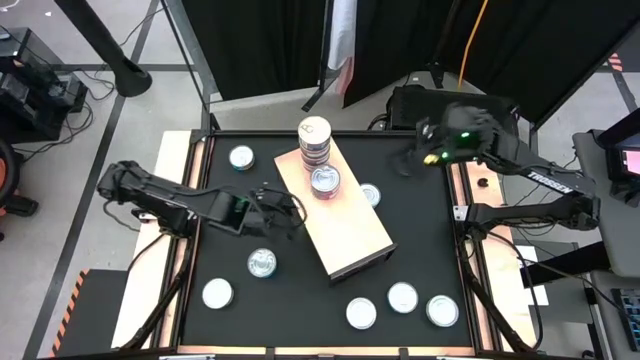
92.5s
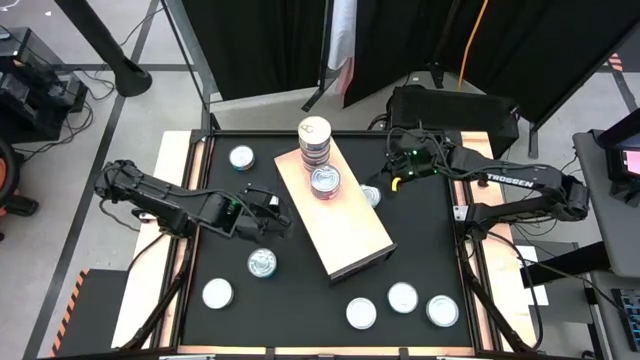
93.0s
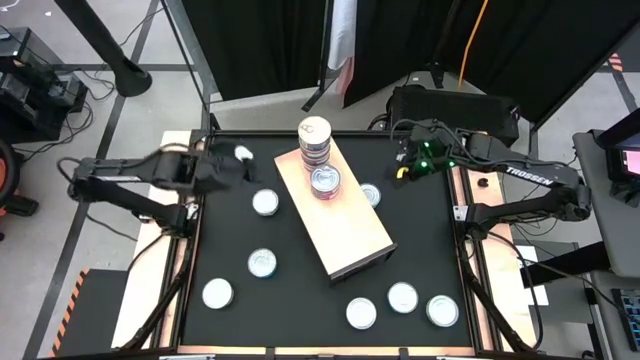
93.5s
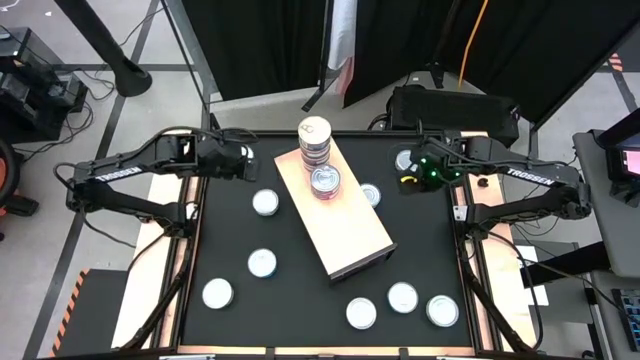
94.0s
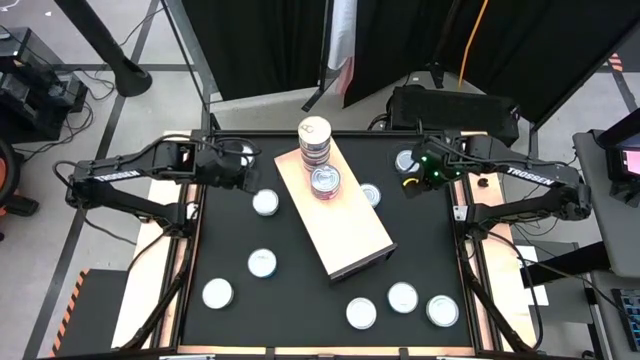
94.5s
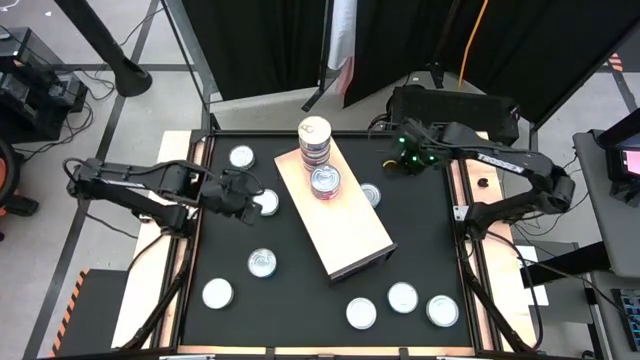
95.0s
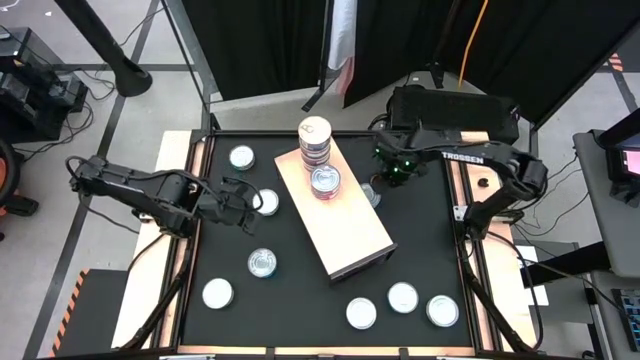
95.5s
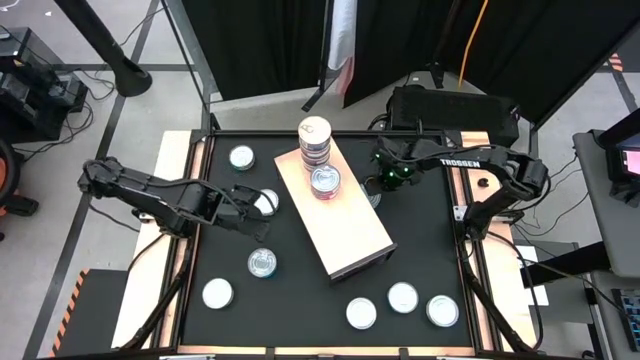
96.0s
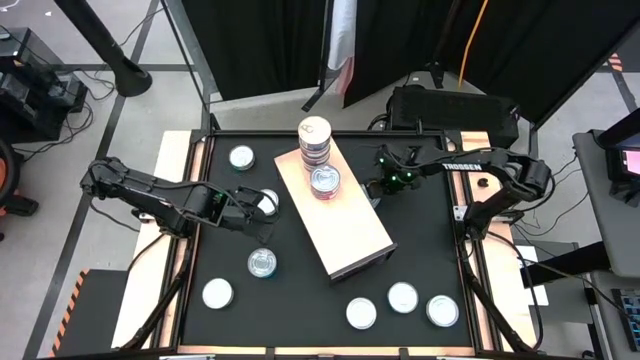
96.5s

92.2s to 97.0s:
Task: Stack canned seafood by type on shelf
Put the yellow-blue tuna can on the shelf

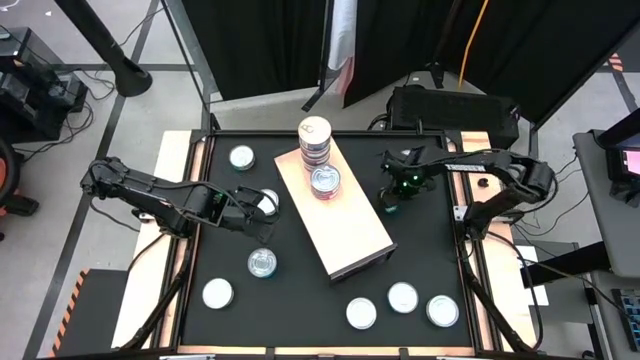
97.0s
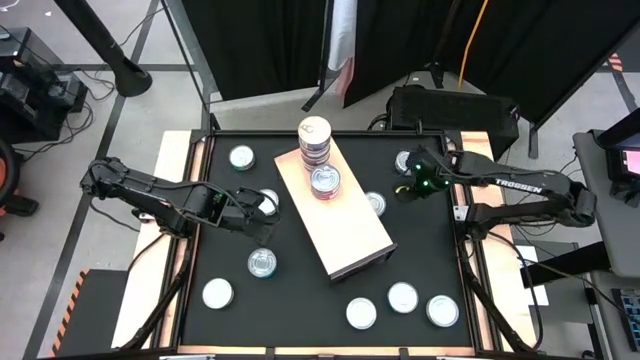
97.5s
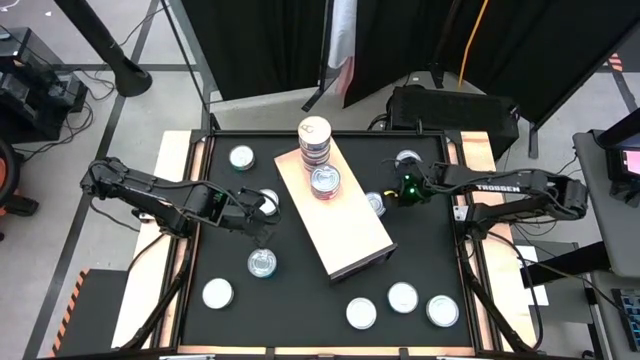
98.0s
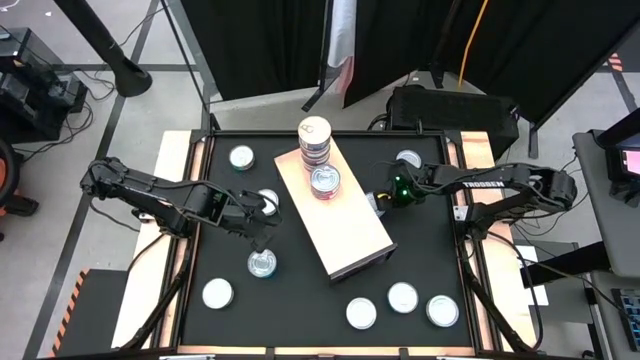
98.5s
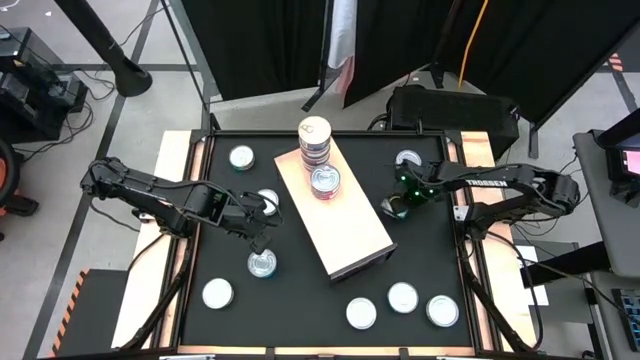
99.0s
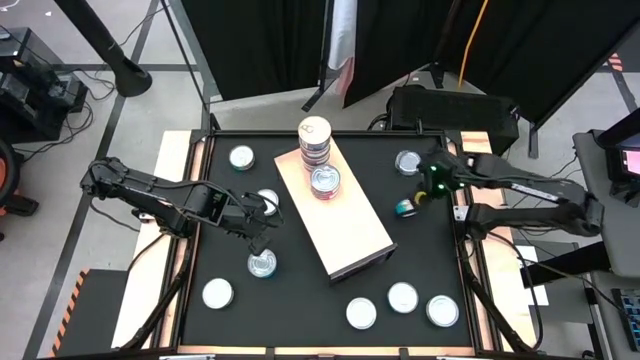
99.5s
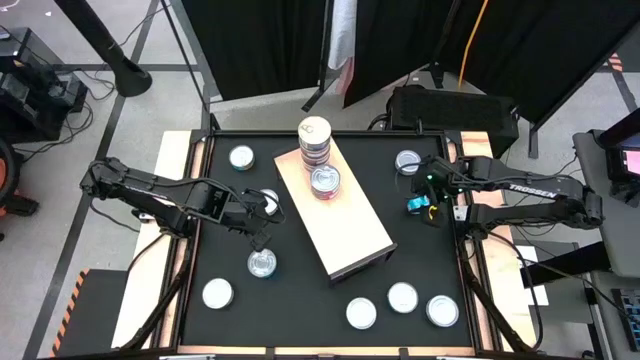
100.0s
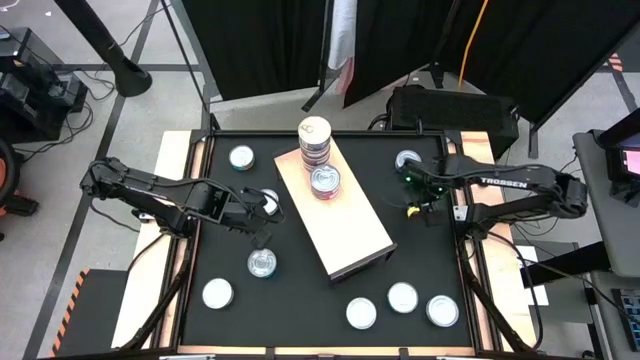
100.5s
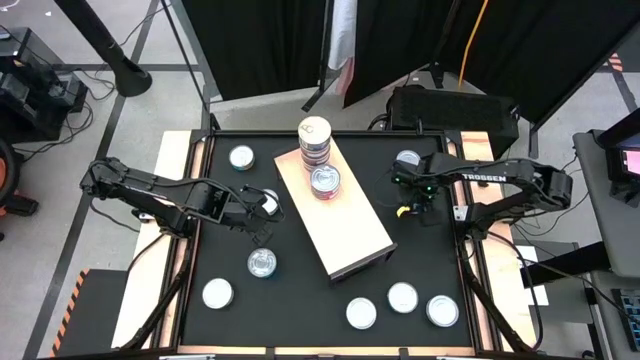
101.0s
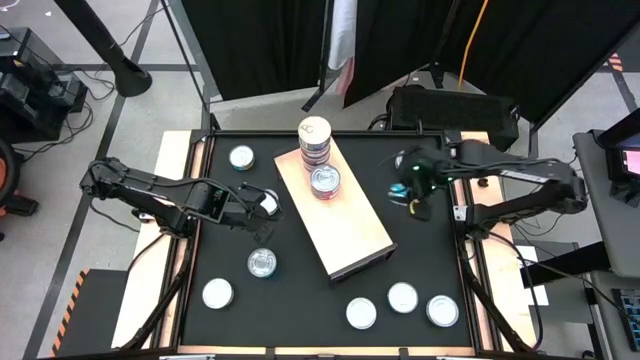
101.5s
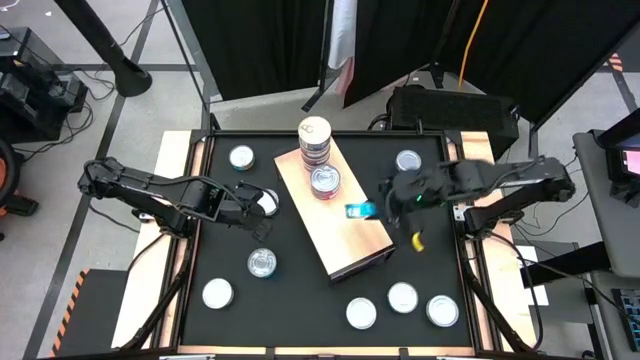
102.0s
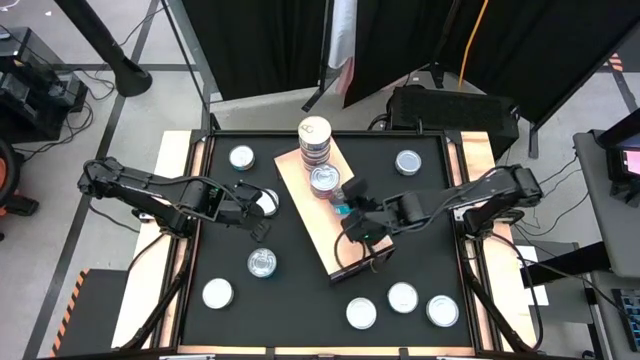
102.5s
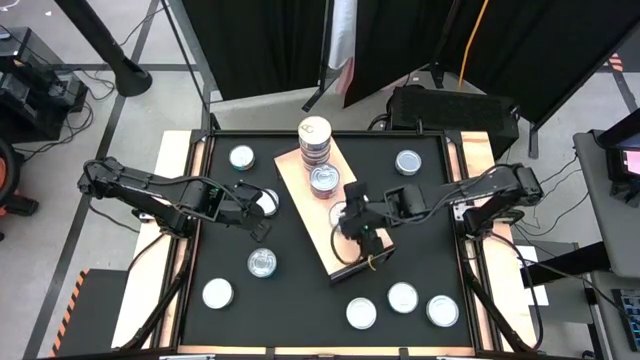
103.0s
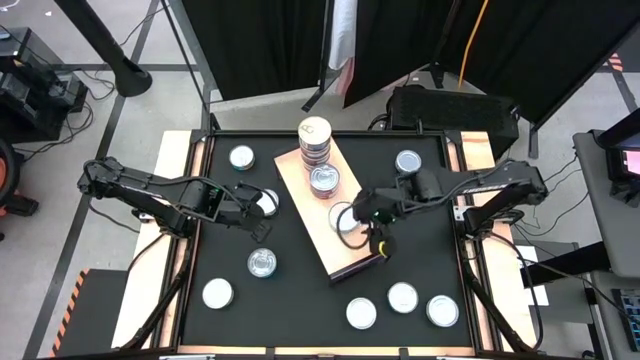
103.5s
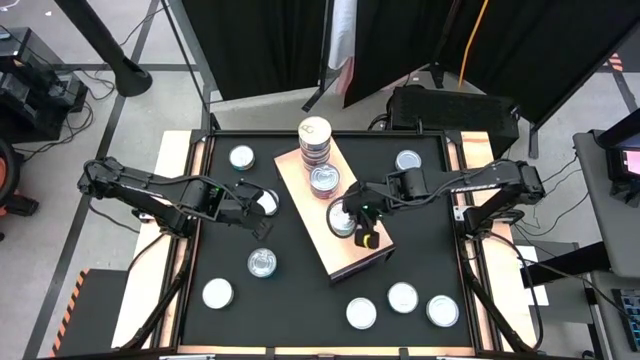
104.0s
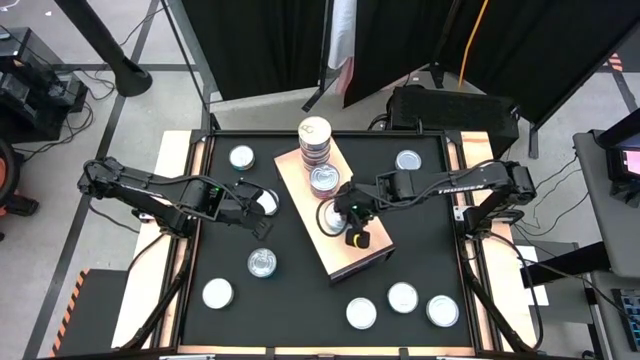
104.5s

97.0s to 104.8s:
Put the yellow-blue tuna can on the shelf

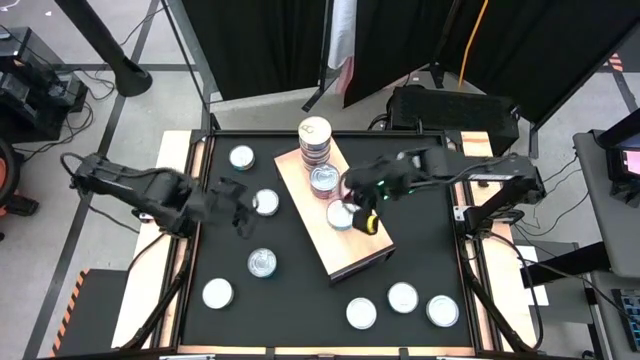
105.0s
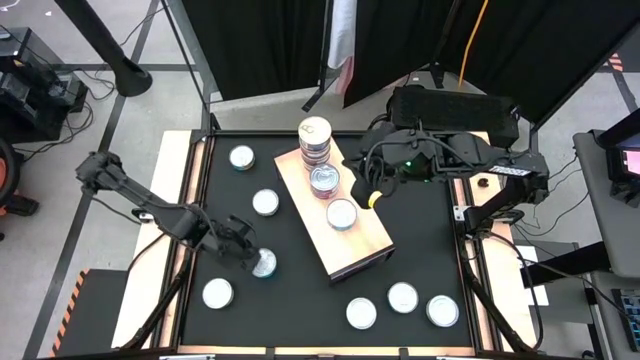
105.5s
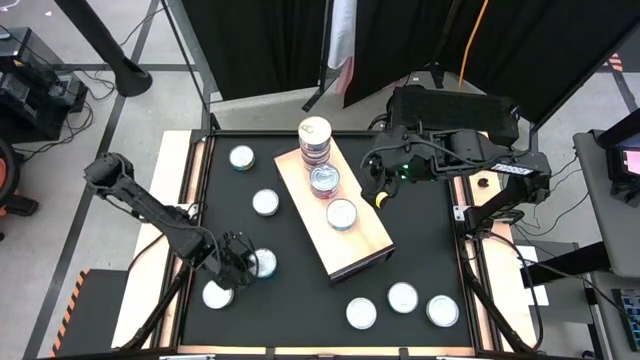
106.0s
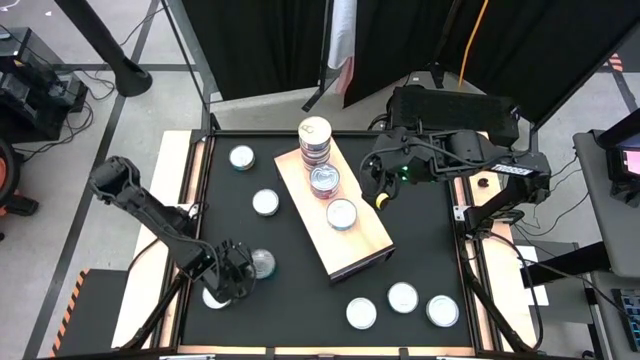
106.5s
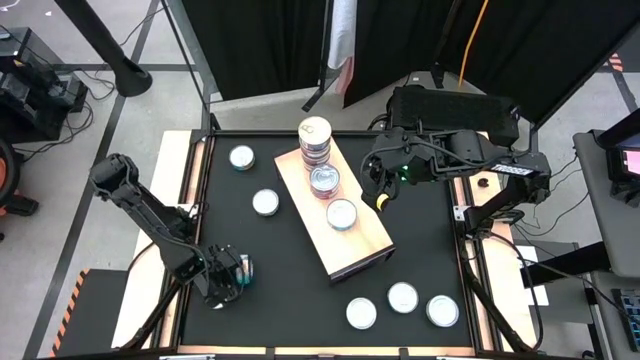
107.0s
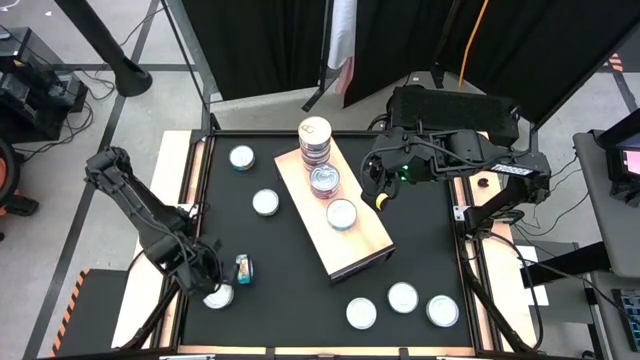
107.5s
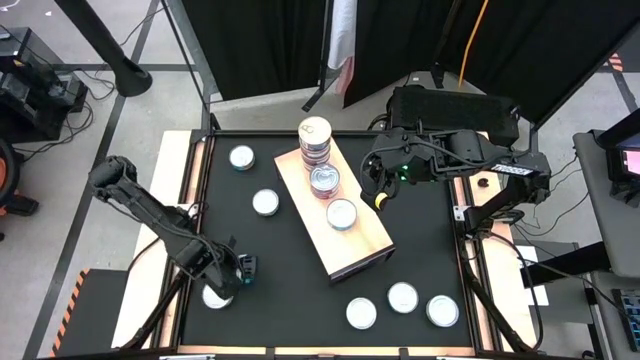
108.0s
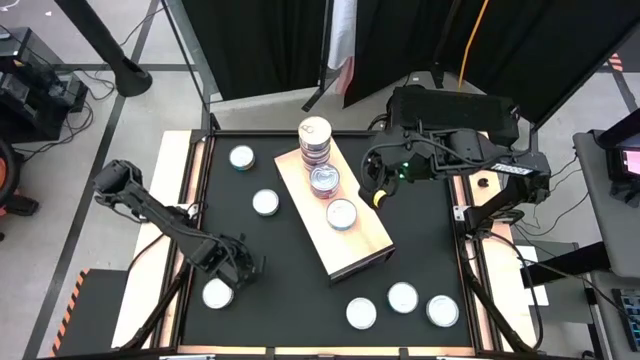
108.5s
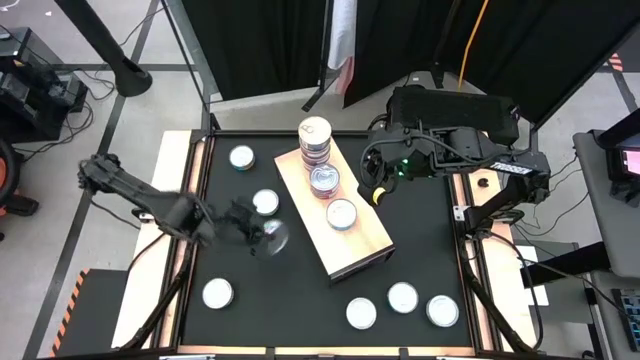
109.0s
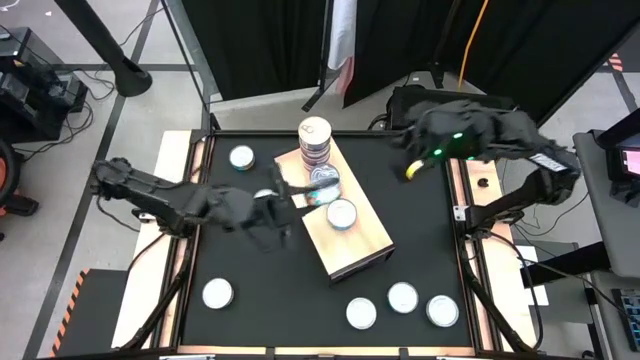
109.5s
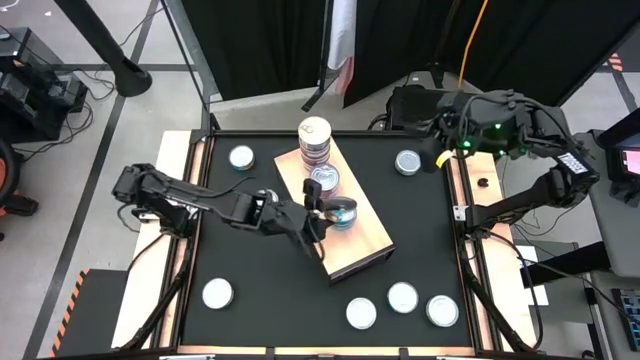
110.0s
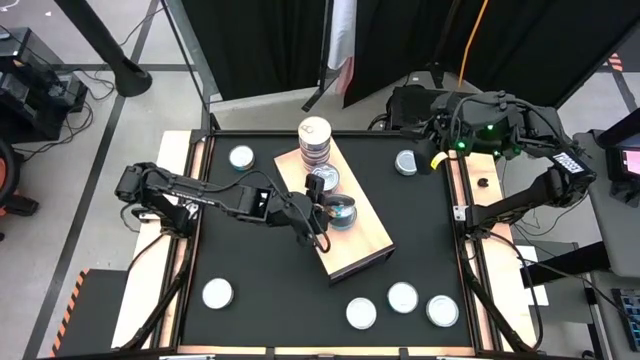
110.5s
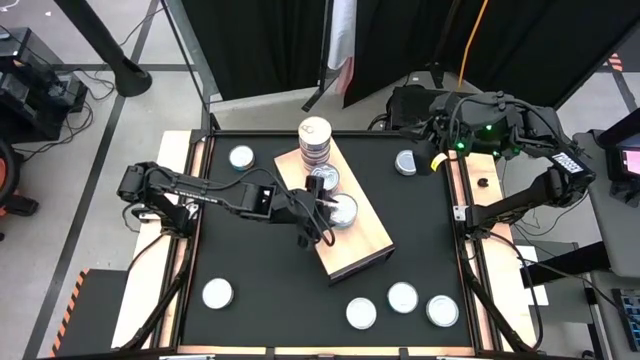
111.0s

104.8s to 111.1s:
Stack the yellow-blue tuna can on top of the stacked yellow-blue tuna can on the shelf

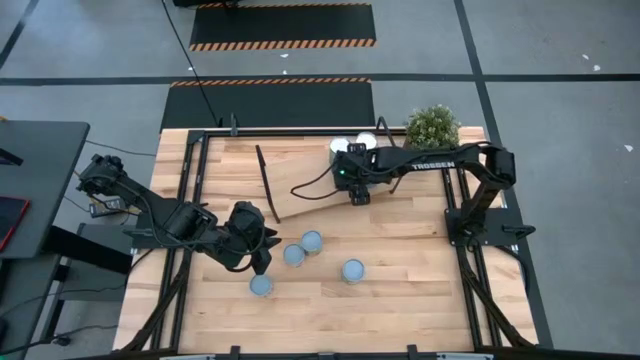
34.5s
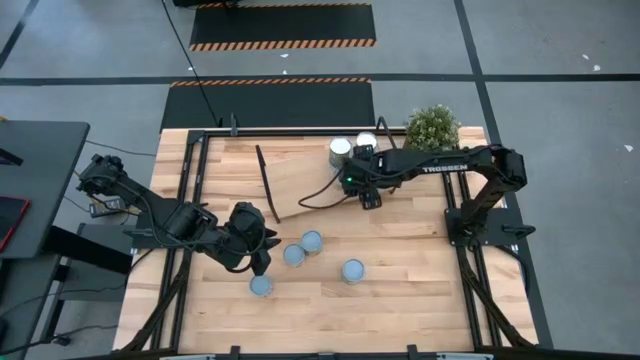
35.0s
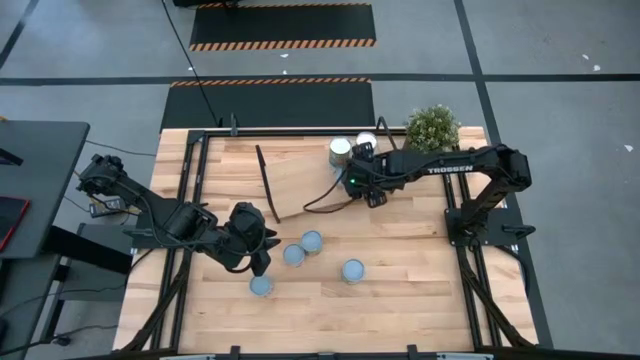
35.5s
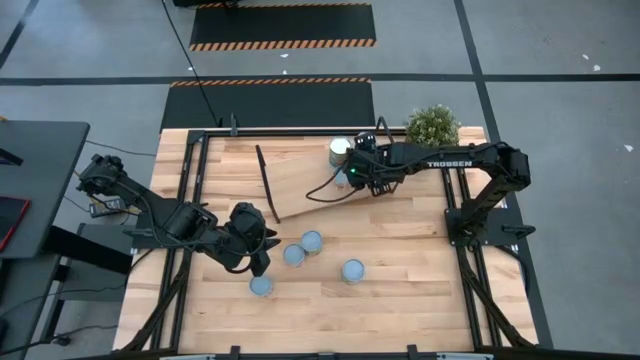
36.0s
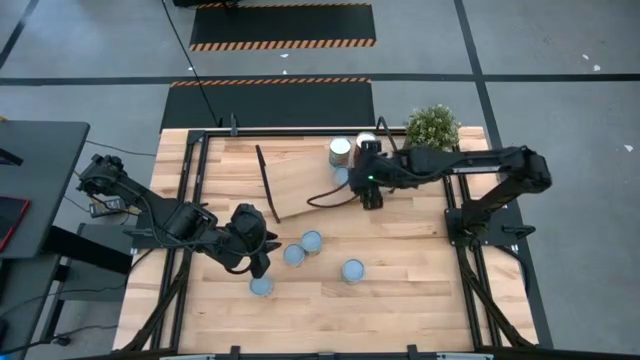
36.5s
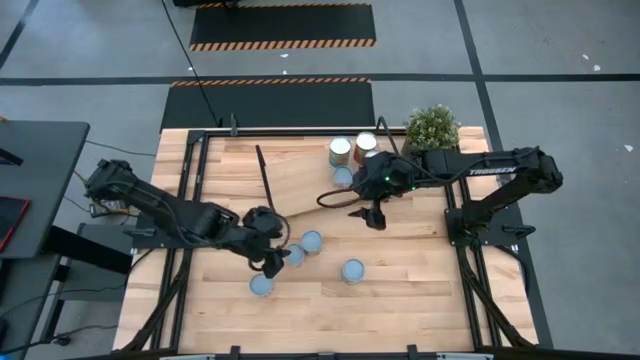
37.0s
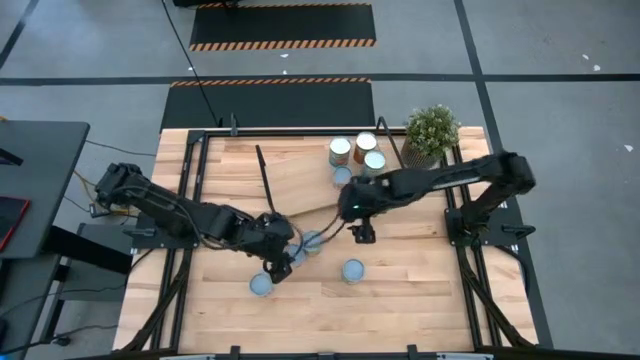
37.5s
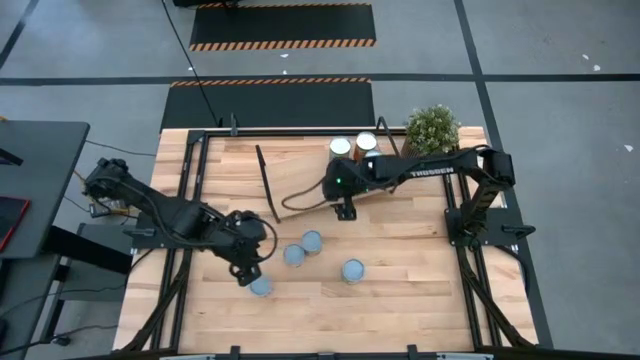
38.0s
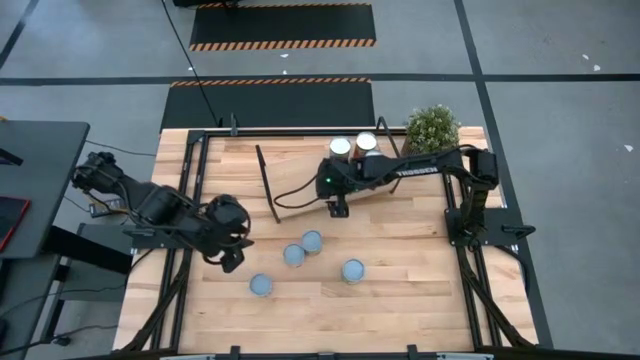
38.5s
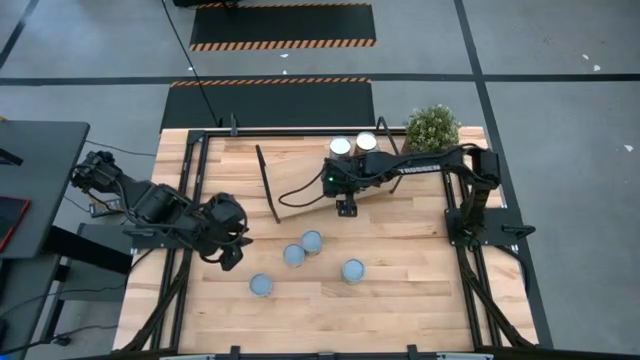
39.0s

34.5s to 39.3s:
Task: Pick and place cans onto a shelf
Adjust the canned goods on the shelf
